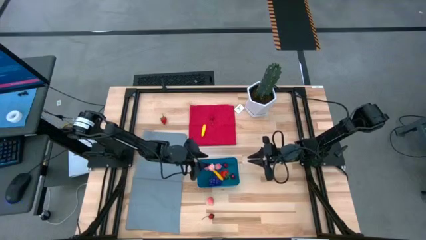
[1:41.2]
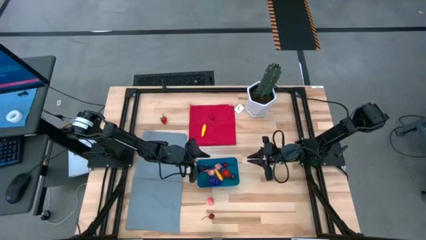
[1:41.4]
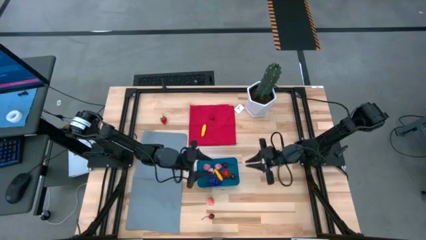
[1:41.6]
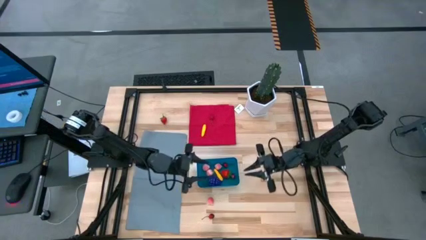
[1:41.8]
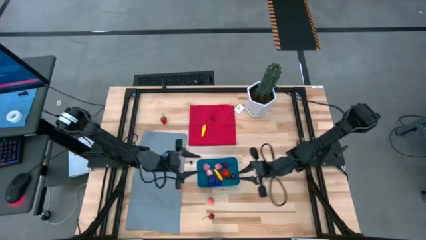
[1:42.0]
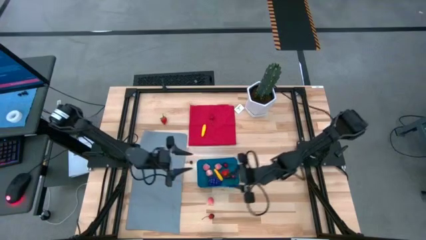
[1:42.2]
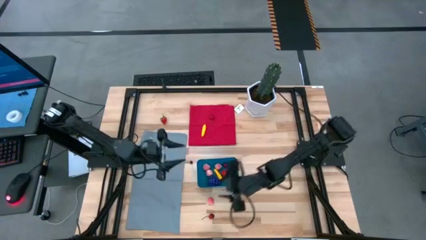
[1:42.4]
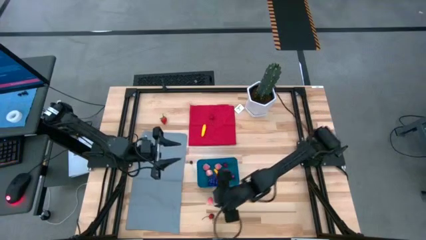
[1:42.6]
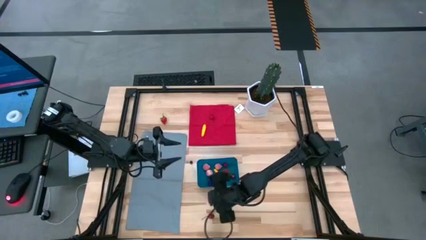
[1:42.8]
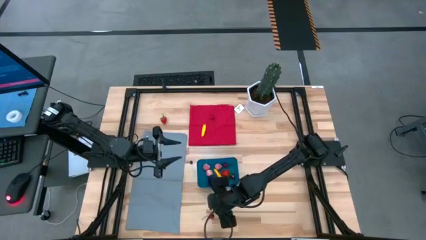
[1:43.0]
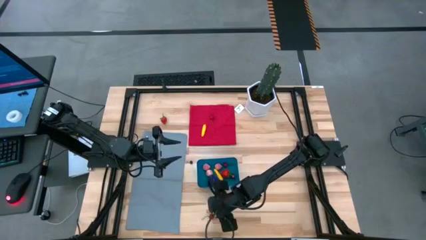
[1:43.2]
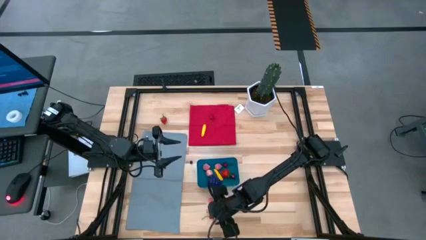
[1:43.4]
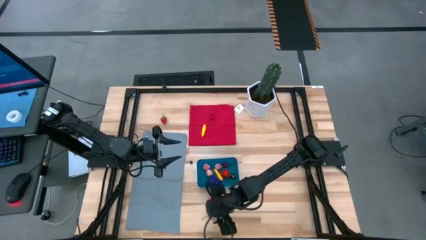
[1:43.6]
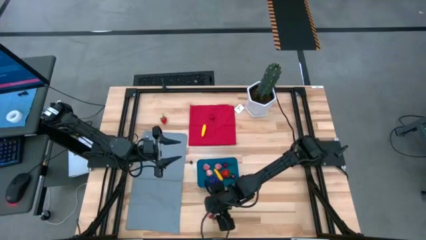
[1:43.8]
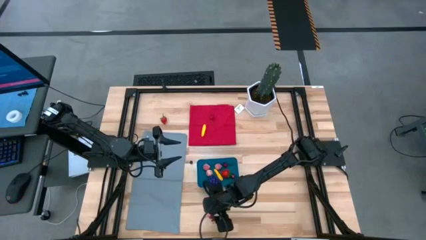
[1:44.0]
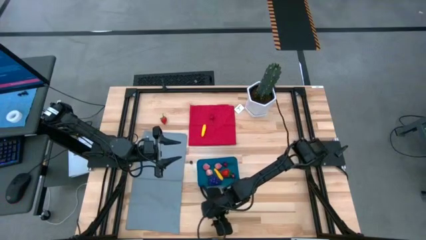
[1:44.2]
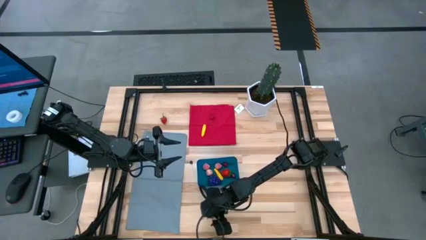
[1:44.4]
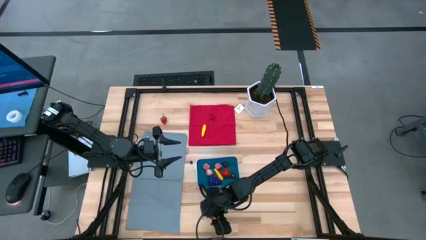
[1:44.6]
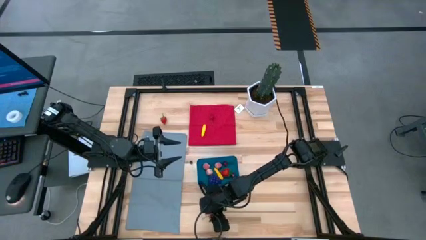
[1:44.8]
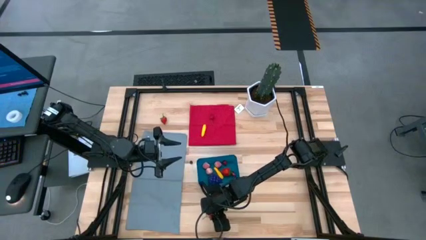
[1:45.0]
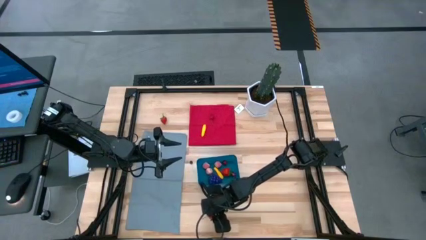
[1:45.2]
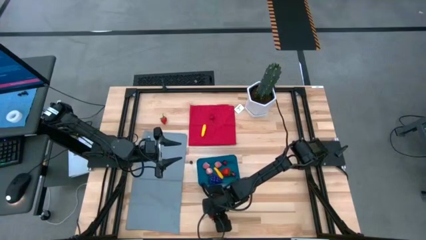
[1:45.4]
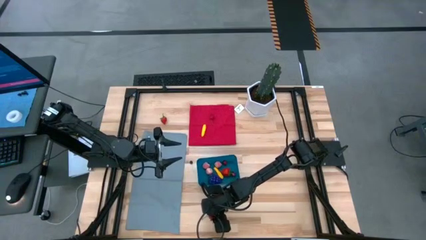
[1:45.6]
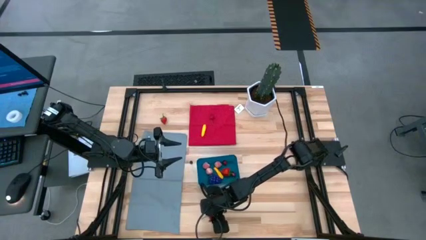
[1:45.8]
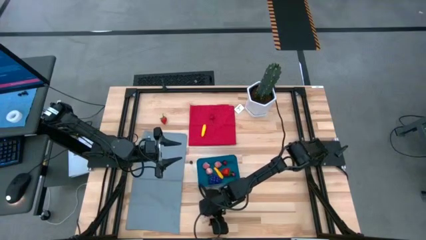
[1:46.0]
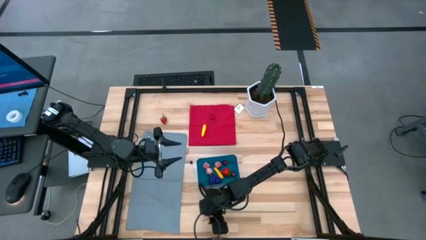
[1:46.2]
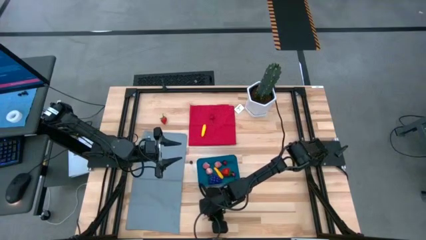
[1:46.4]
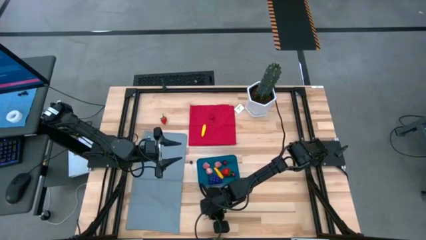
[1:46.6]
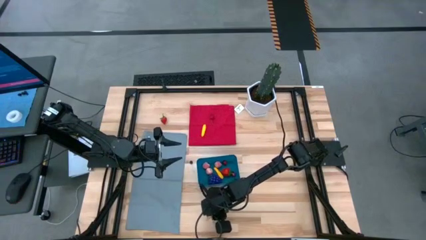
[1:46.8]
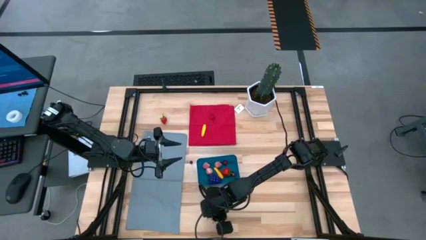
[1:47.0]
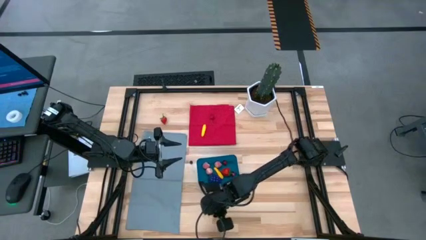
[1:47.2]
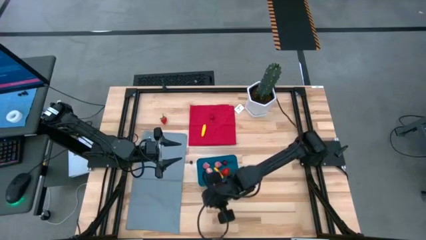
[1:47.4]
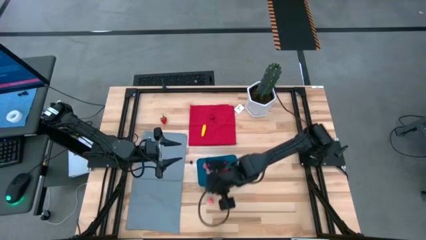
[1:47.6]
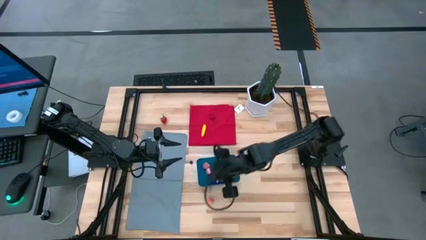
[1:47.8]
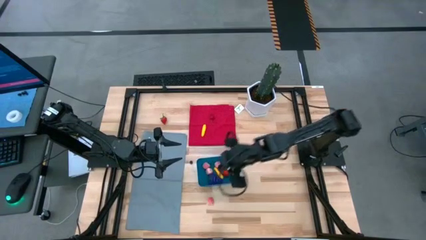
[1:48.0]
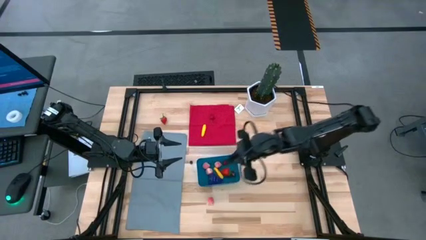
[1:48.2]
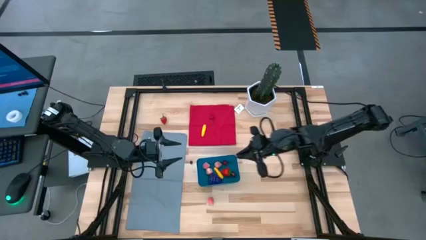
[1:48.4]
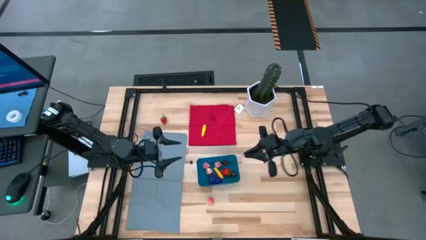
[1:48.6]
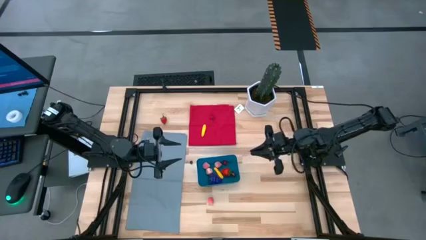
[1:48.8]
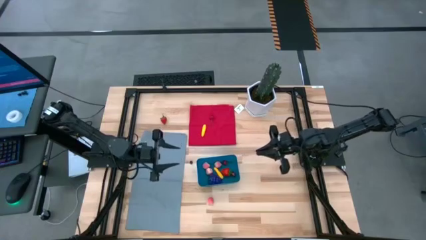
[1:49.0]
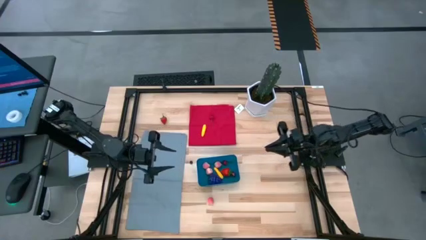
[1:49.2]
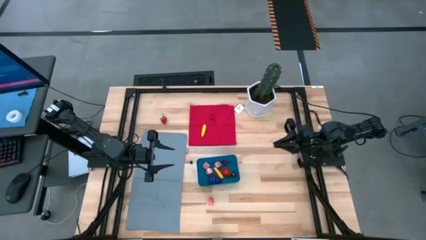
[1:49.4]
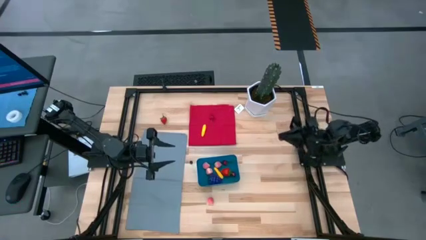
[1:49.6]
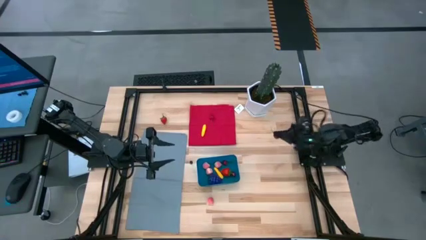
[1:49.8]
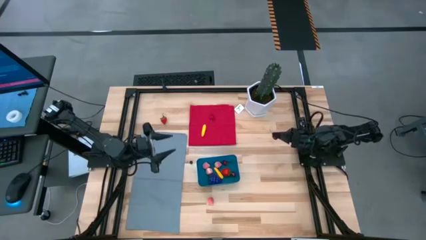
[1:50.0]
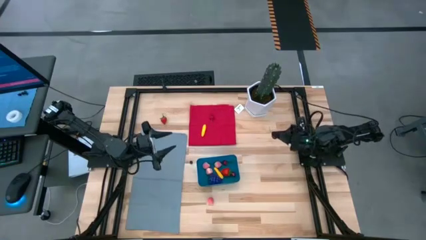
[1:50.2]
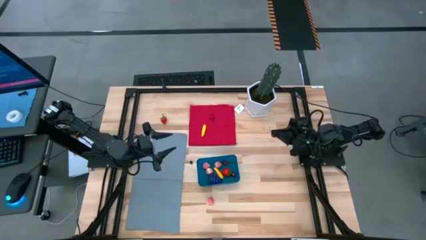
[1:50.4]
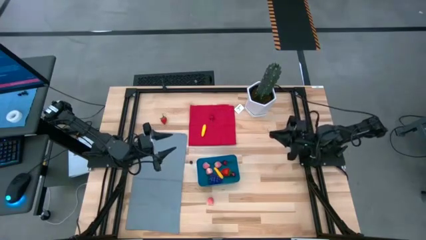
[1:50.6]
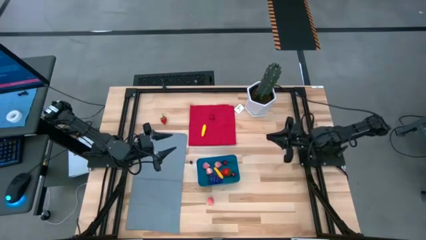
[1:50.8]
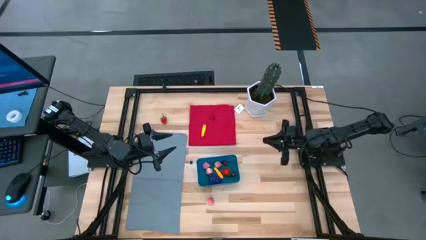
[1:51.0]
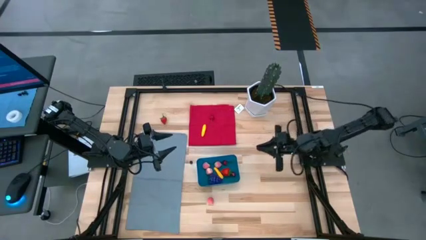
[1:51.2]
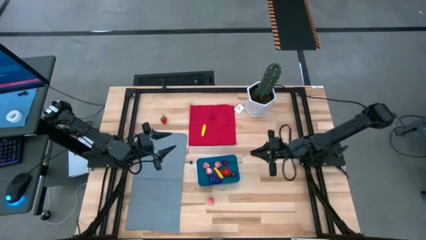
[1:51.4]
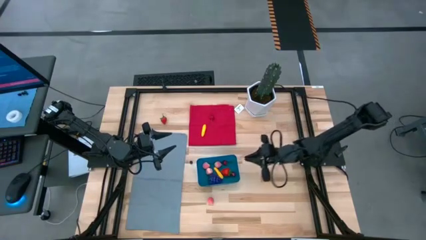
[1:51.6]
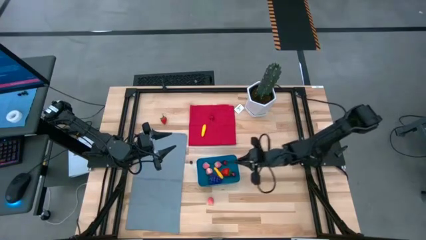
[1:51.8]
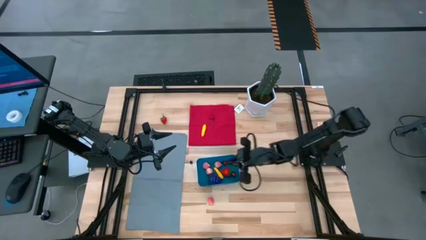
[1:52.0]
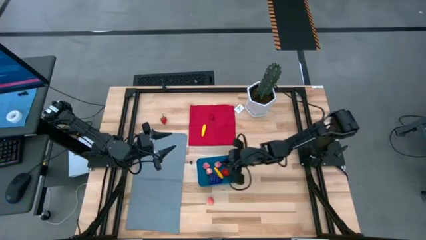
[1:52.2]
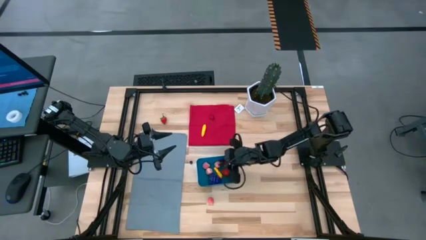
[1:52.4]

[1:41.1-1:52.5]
Task: Pick and placing Produce into tupperware
Put the cherry into the blue bin
